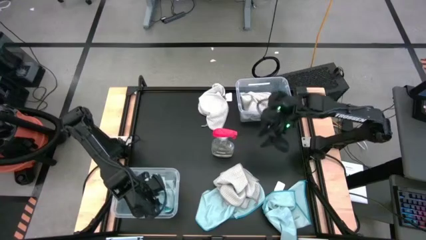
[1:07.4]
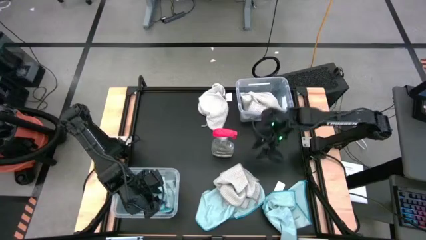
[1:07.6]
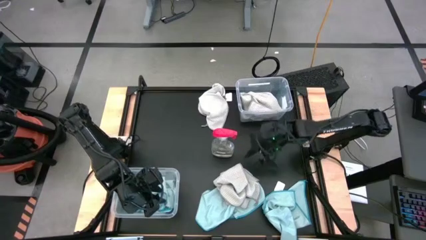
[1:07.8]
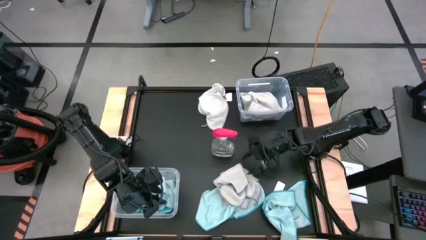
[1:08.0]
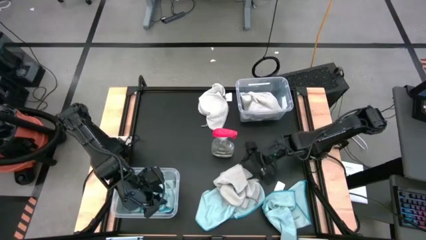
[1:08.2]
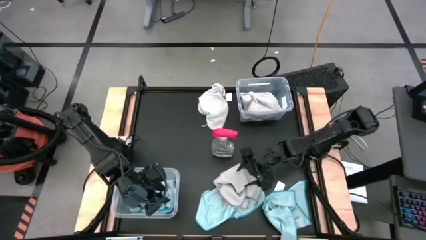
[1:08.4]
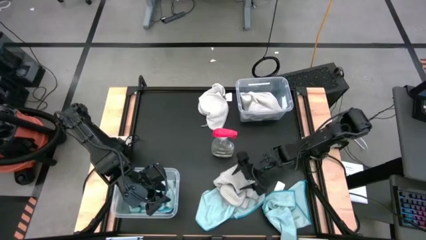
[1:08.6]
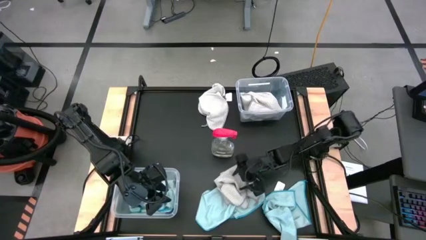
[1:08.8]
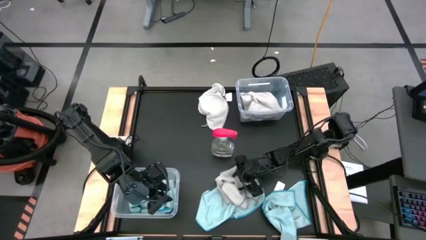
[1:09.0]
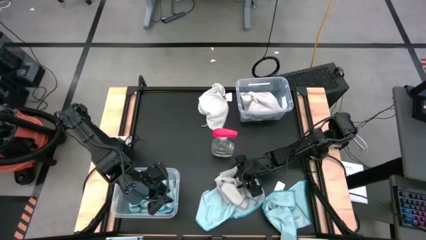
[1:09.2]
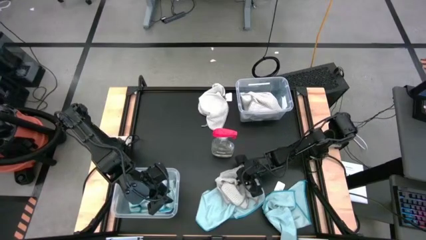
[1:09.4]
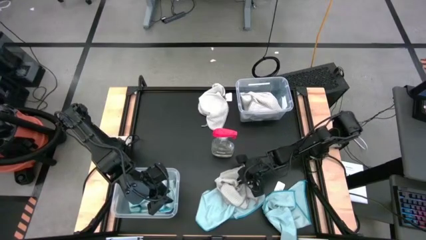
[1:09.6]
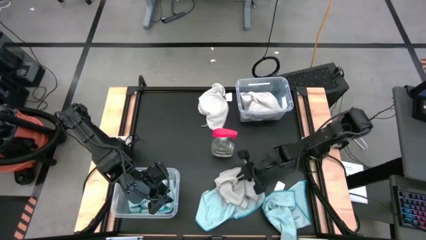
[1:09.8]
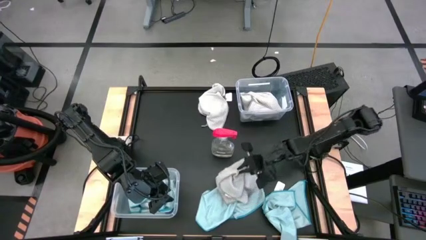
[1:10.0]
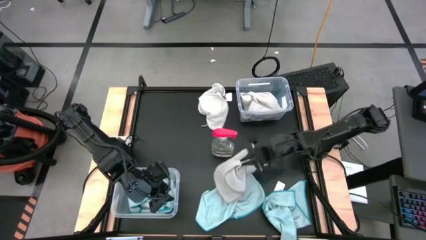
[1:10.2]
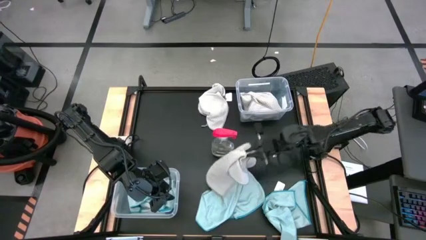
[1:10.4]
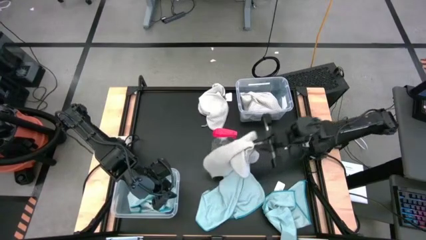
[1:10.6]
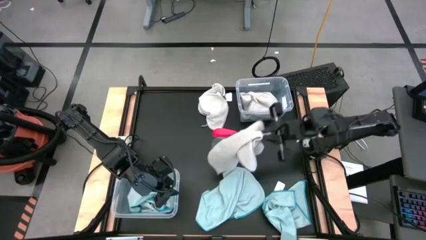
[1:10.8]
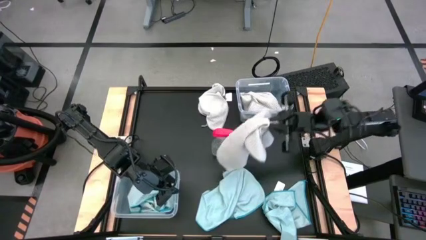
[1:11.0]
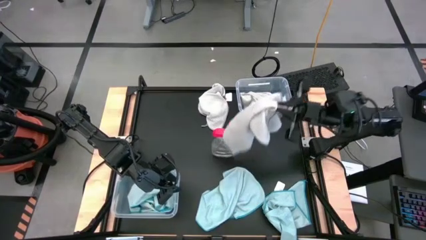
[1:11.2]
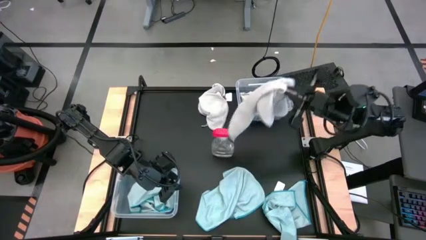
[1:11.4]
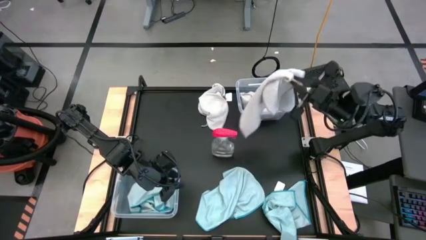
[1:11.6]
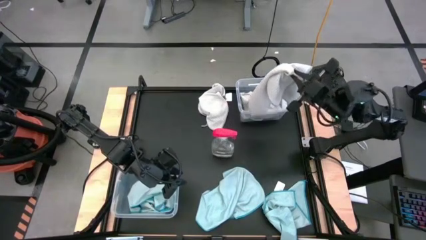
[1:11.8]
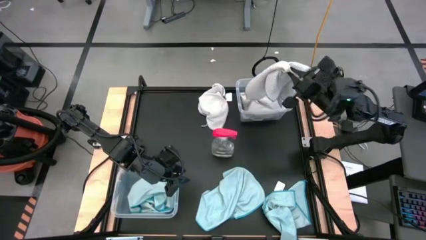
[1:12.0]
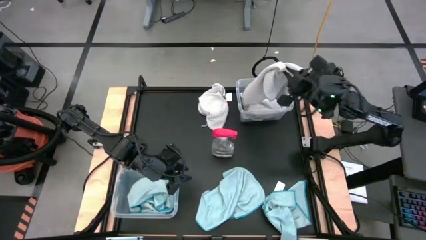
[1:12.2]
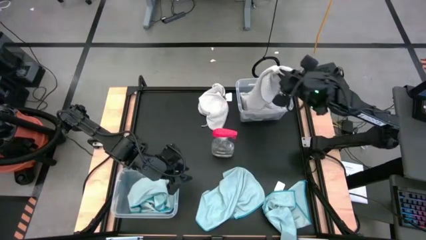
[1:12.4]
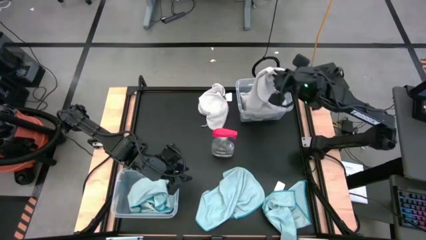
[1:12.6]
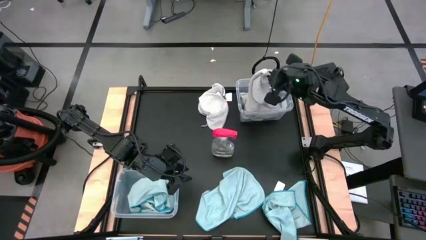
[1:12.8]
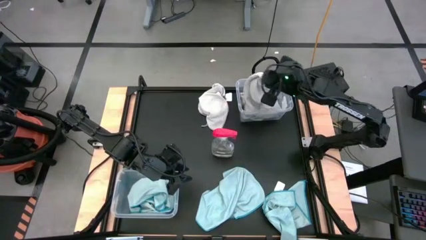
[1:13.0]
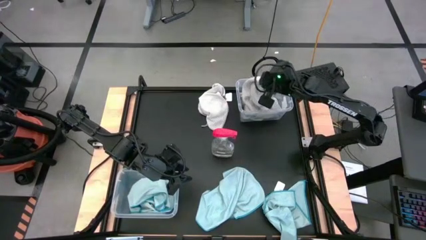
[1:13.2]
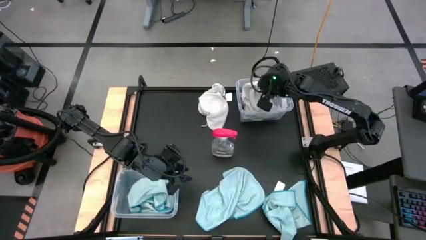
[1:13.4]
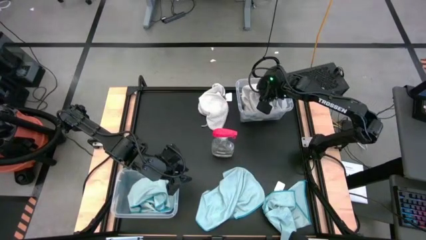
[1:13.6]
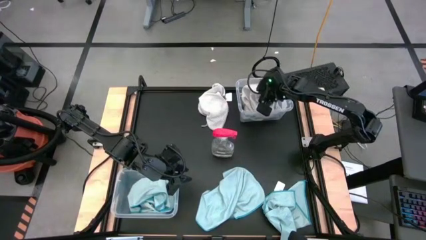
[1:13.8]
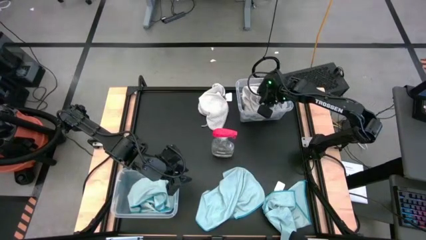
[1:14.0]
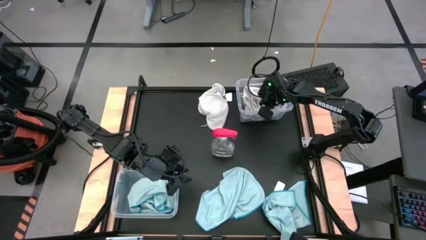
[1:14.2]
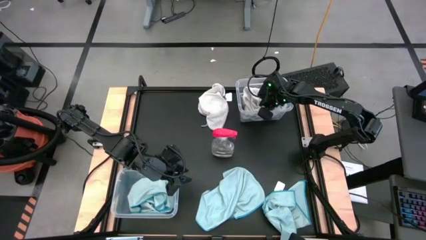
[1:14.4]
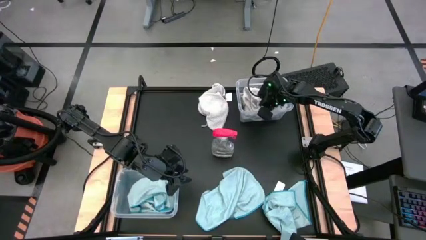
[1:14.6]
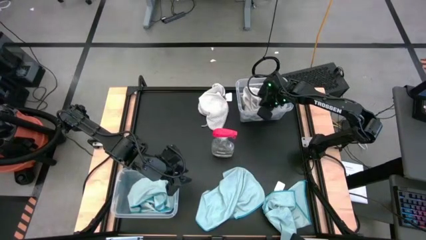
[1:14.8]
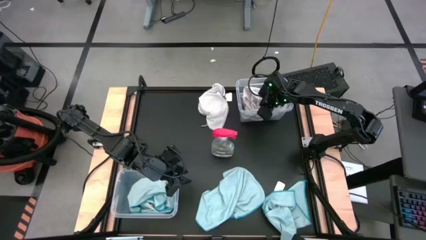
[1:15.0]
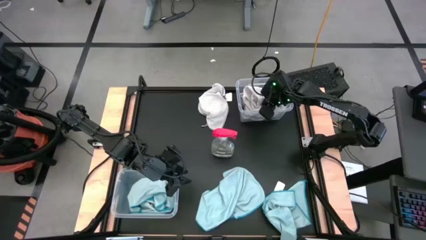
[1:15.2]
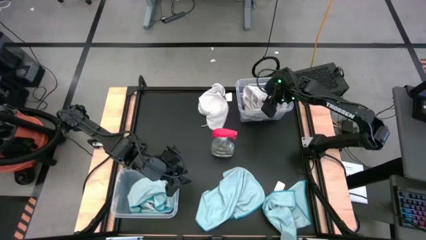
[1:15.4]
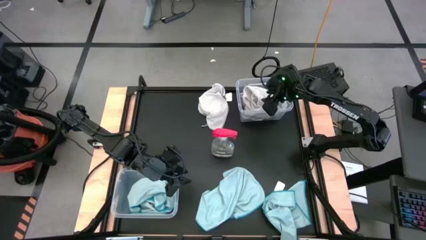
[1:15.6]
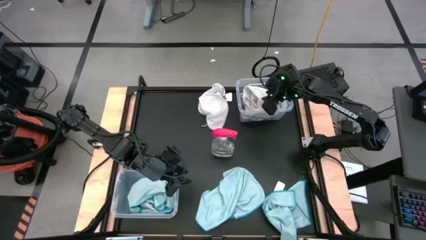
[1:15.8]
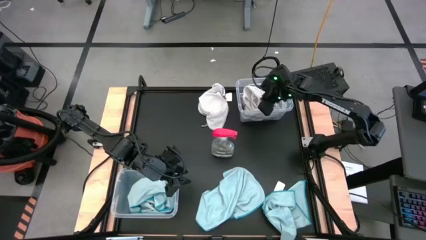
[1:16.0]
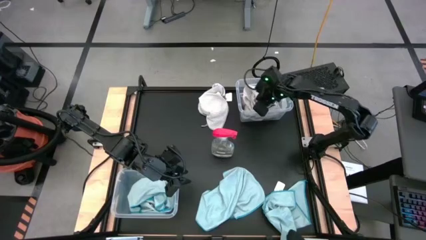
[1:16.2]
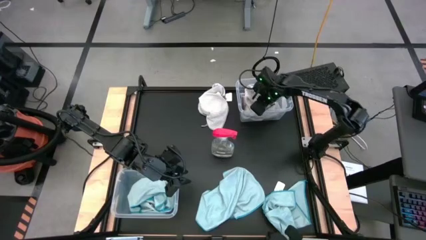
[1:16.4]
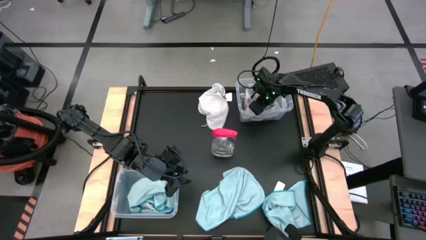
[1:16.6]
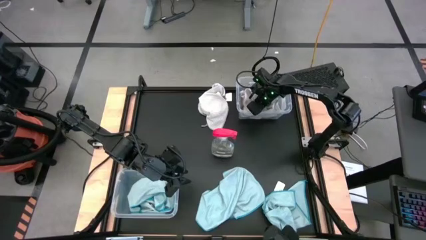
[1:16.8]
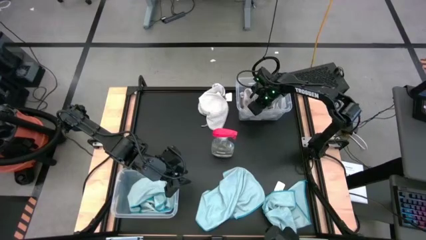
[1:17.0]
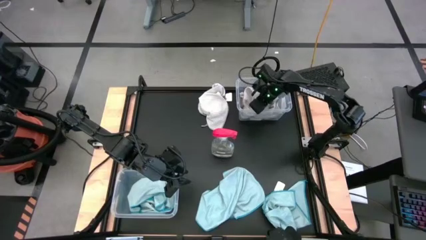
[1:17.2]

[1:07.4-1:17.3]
Task: Sort microfiber towel by color & place in baskets
Put the gray towel into the top transparent bin

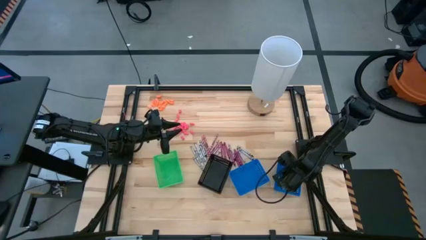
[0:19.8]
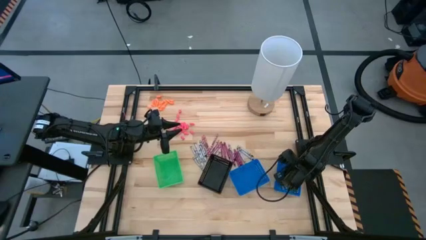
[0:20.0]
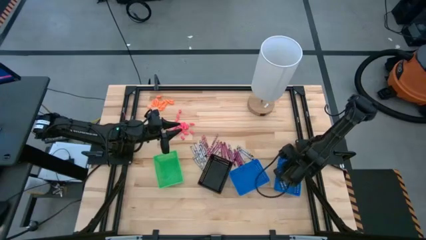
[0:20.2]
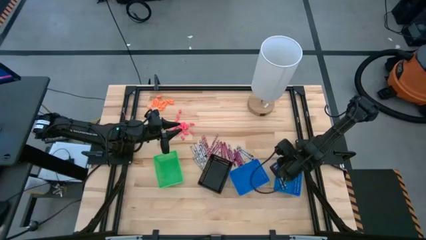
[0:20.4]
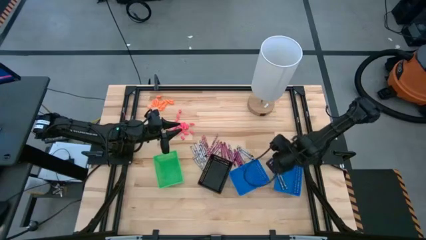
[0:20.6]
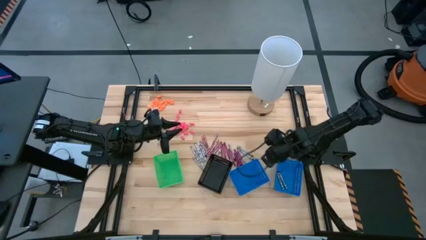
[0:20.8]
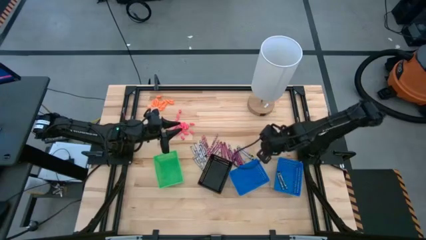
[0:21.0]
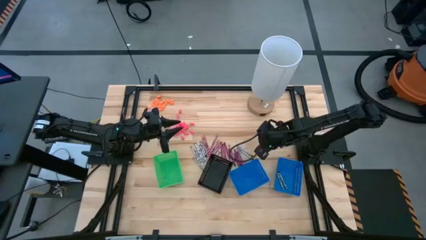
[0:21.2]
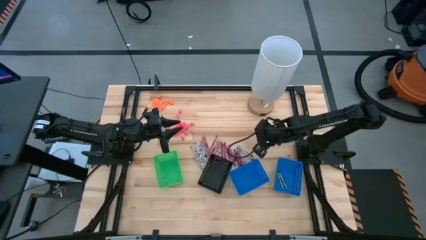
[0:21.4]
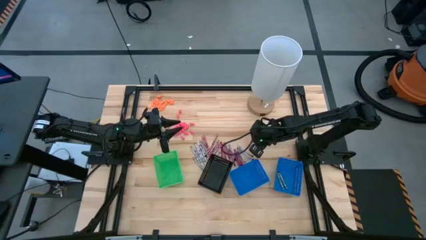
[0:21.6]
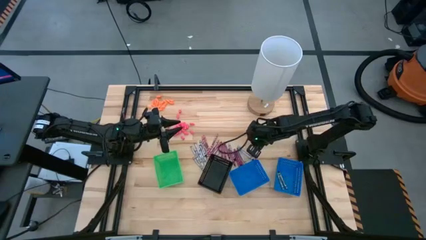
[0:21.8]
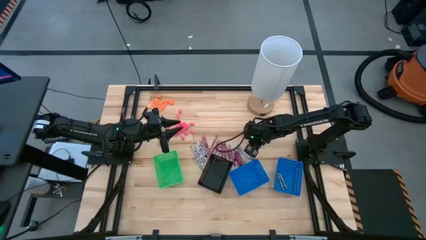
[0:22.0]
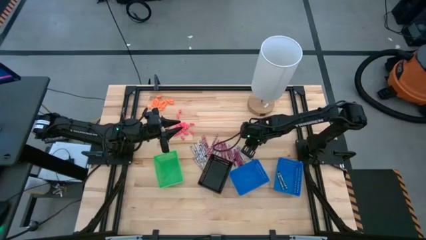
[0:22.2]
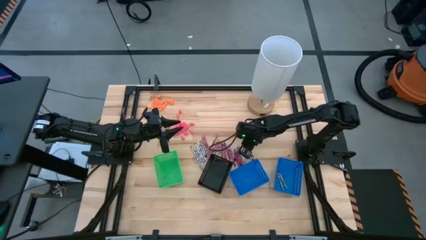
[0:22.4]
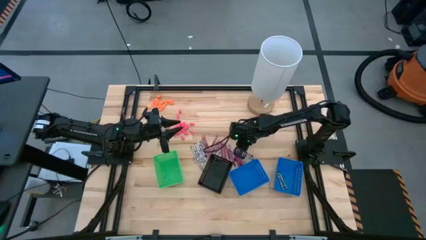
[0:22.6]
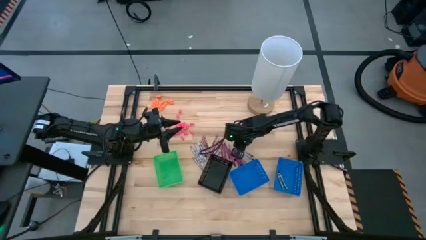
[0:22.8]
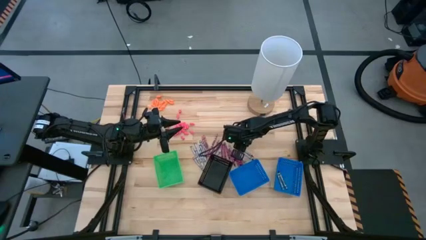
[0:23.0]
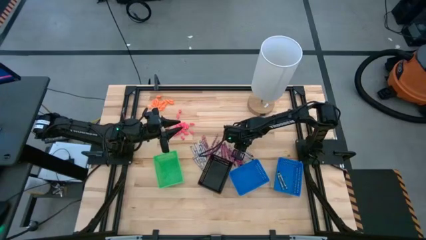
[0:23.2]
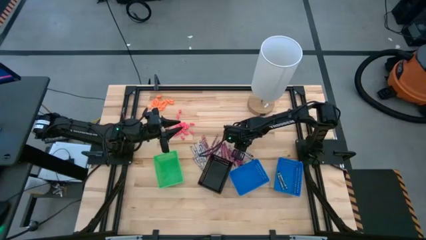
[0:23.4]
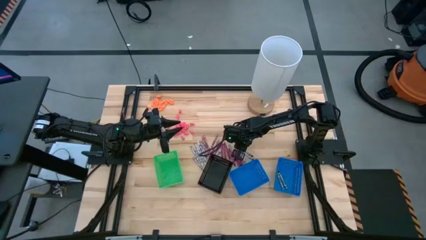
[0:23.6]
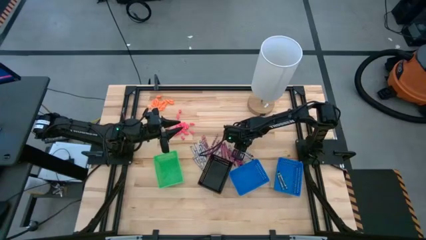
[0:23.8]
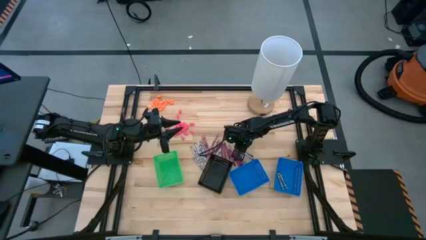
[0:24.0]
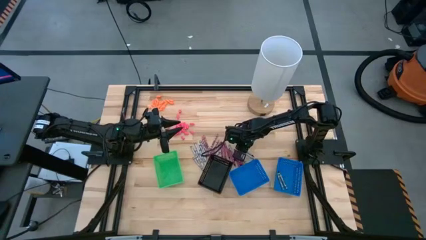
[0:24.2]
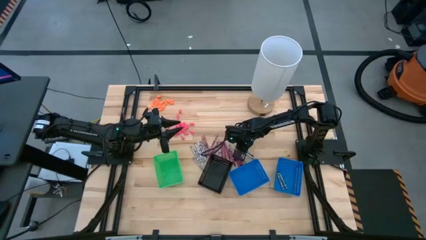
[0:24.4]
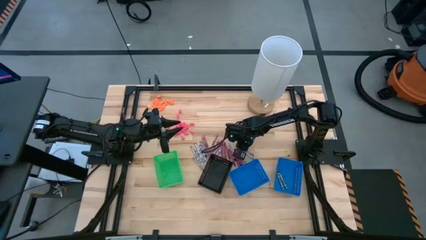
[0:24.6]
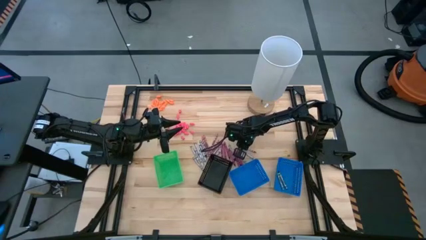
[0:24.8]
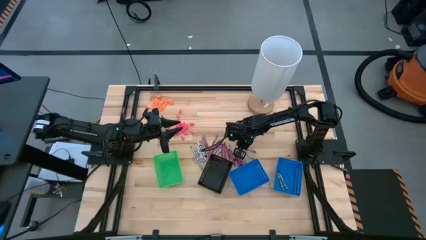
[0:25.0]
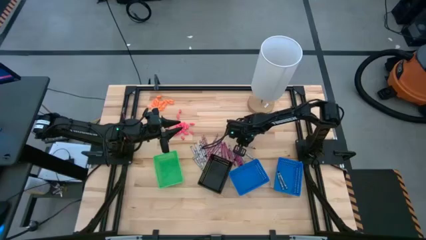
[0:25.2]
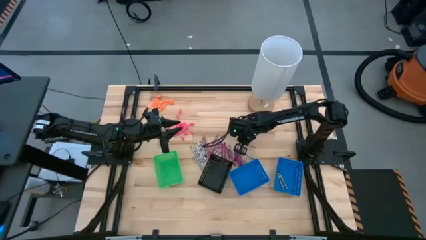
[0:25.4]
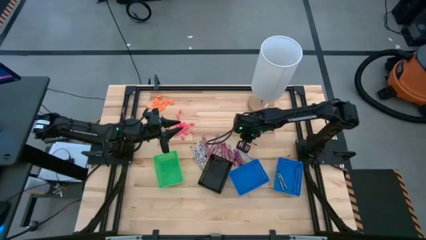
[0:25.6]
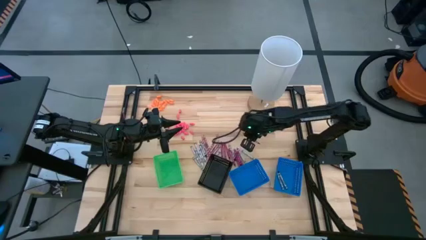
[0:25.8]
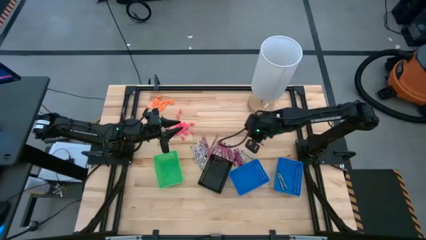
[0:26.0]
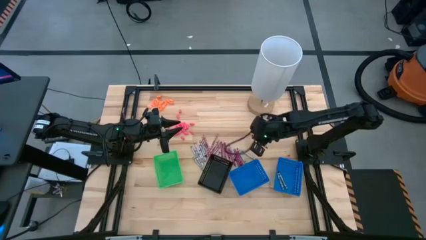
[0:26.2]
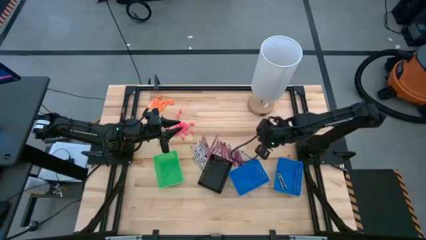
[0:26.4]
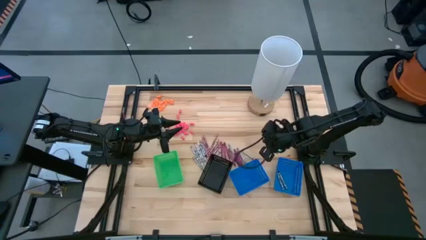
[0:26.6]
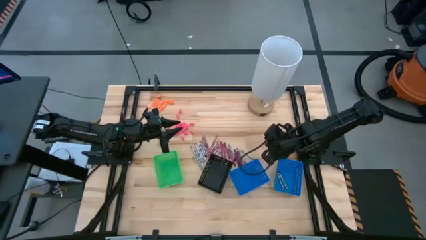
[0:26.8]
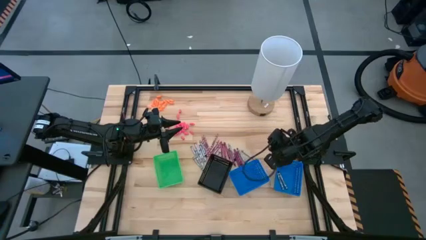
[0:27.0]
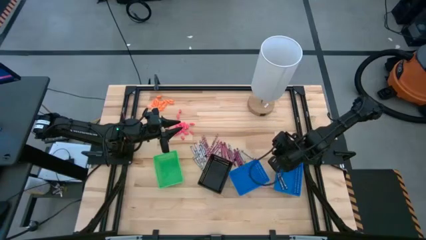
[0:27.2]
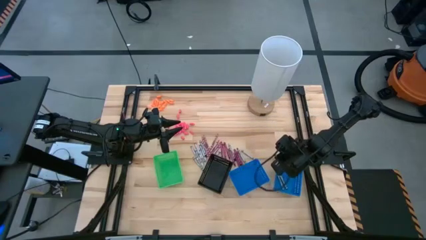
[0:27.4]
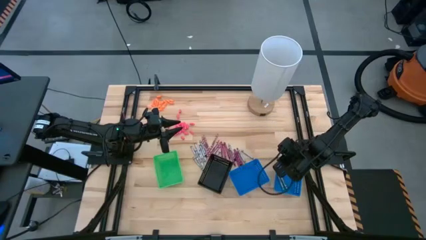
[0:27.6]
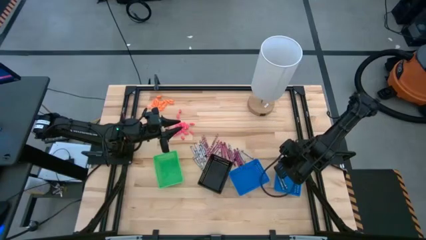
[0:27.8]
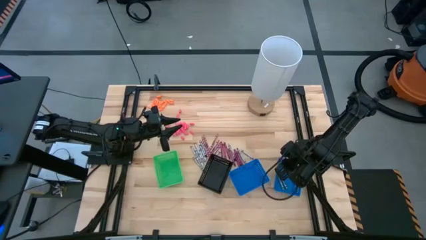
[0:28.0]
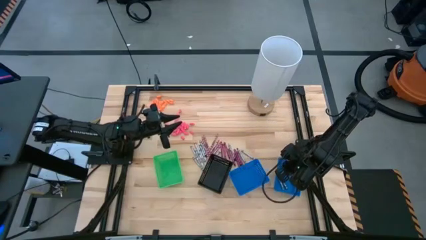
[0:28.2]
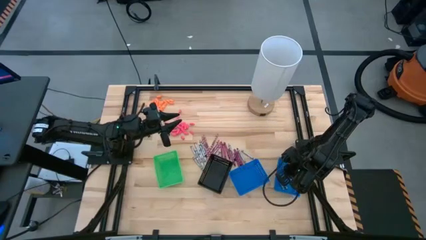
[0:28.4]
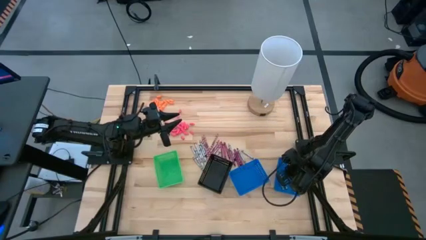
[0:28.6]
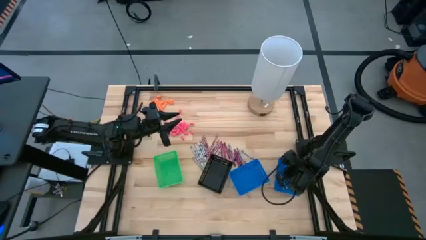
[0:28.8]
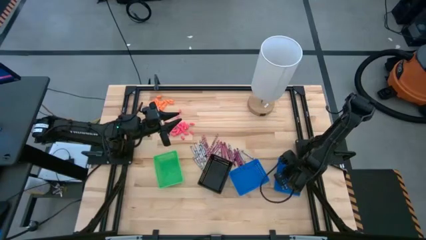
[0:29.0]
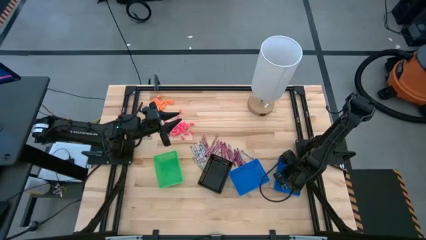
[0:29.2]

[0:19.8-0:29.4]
Task: Sort crayons
Put the black crayon into the right blue bin
